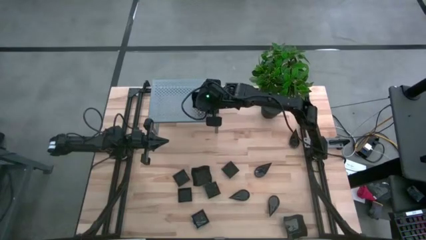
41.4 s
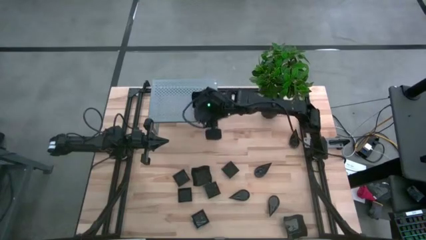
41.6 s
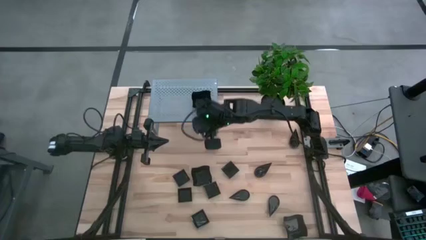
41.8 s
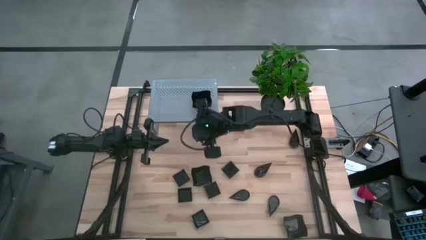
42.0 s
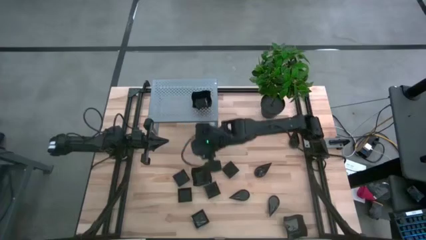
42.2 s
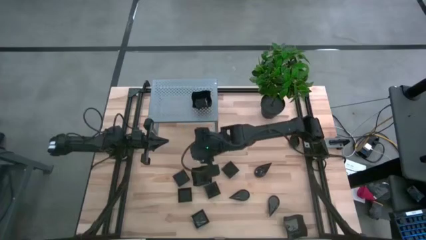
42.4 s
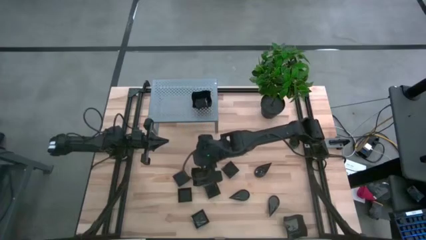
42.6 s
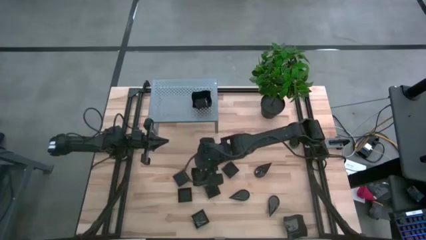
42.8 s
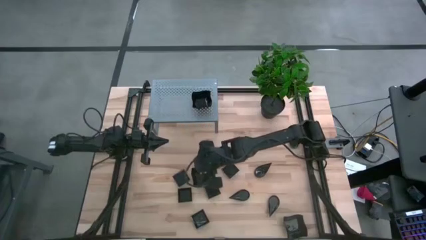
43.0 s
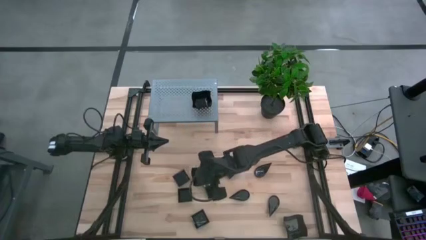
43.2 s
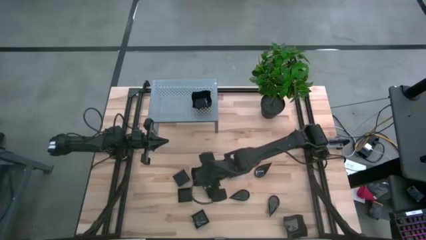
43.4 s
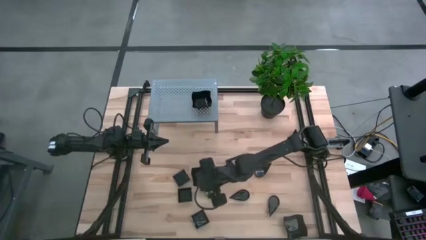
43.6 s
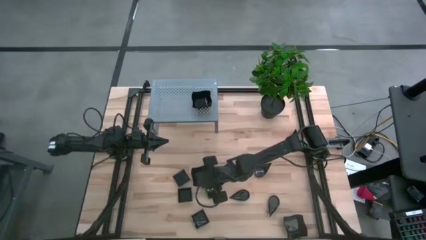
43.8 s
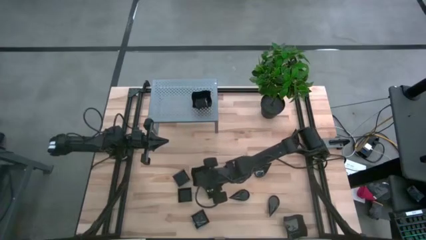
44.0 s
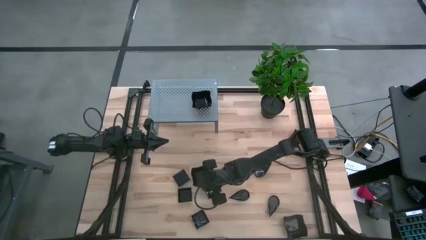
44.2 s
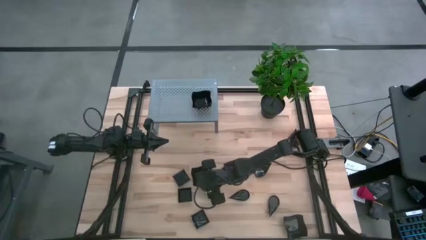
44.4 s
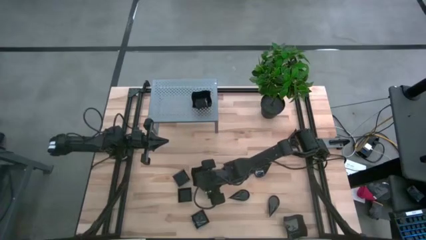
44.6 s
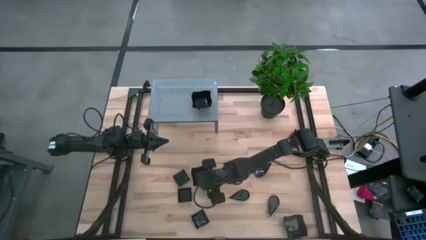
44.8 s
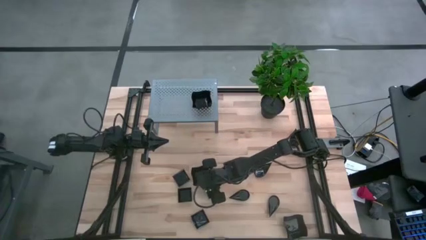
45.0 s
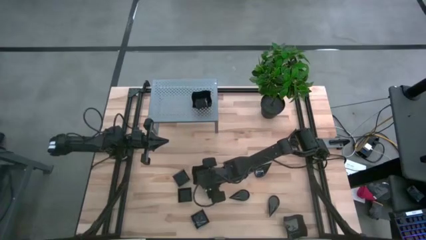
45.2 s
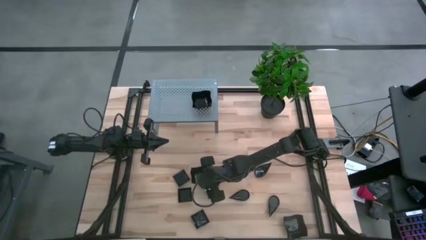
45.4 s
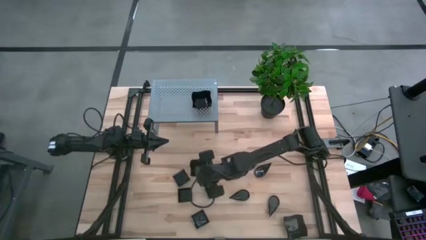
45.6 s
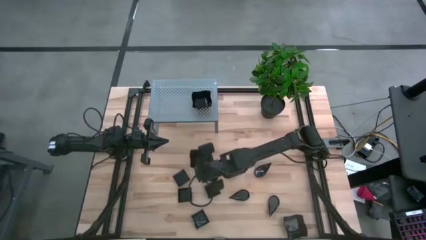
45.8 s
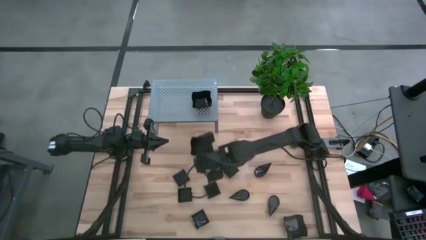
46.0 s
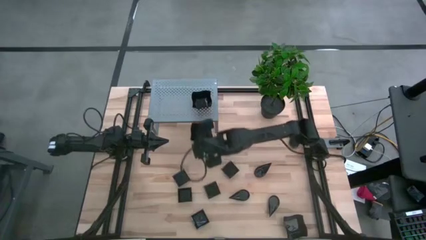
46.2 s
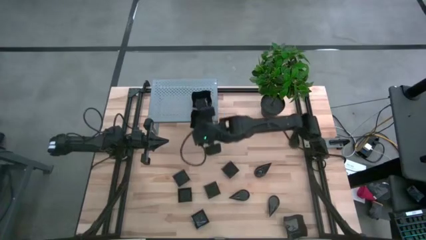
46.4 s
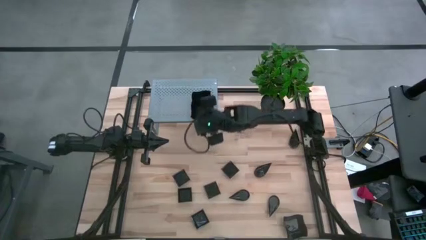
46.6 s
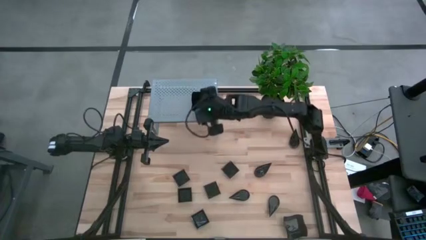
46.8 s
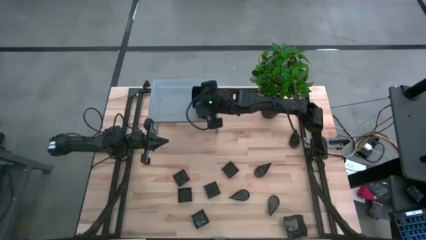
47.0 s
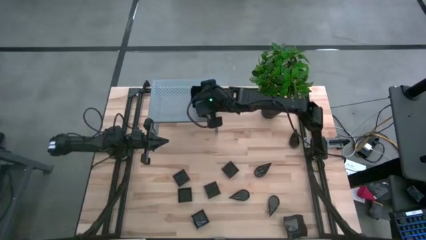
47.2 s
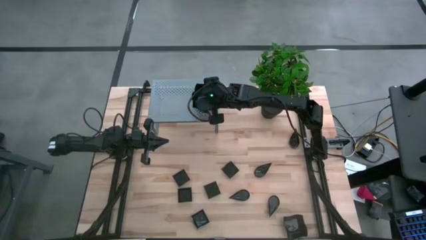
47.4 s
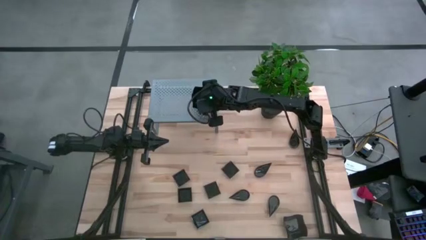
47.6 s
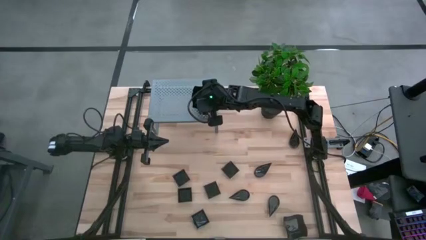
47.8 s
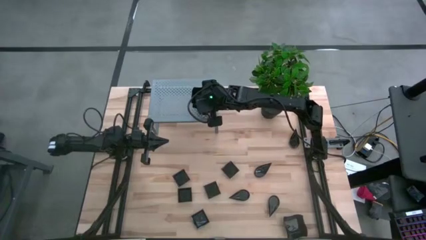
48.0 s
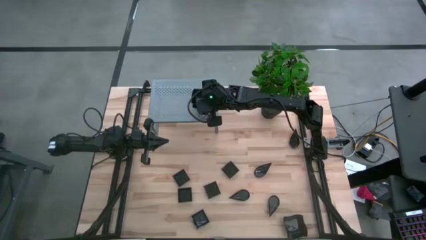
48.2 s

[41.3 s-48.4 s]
Task: Pick & Place Mini shaped plates
Stack the distorted square plate on top of the stacked distorted square plates on the shelf

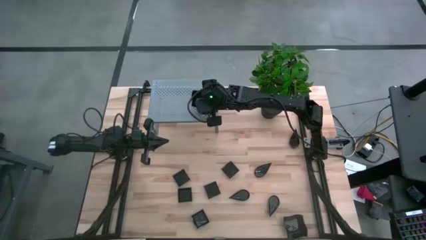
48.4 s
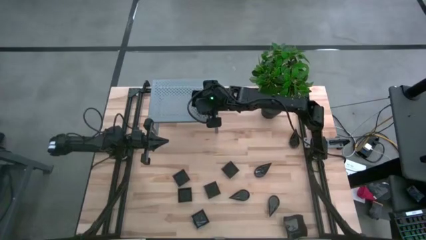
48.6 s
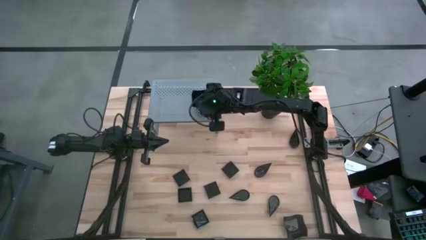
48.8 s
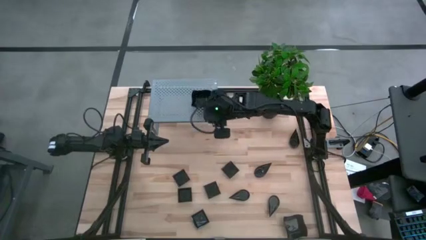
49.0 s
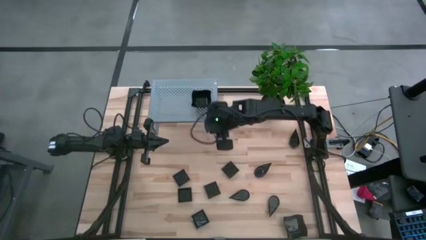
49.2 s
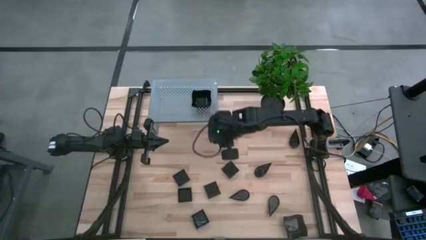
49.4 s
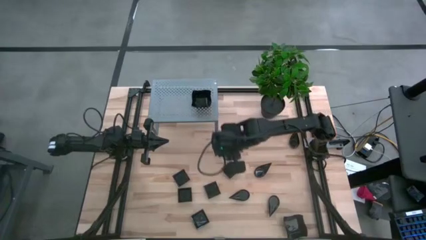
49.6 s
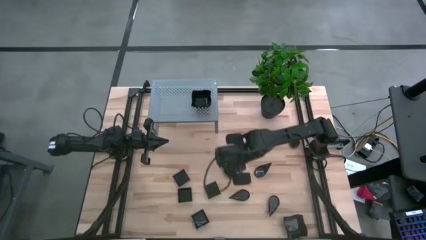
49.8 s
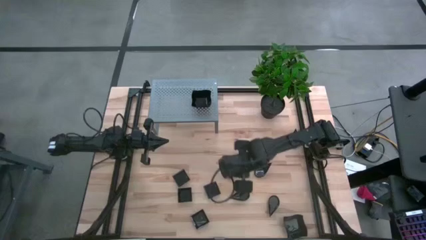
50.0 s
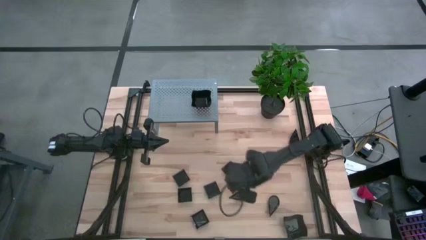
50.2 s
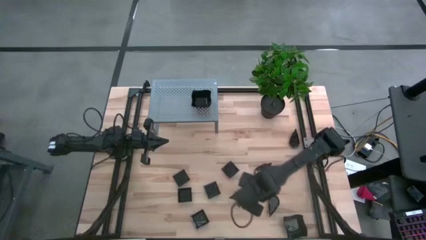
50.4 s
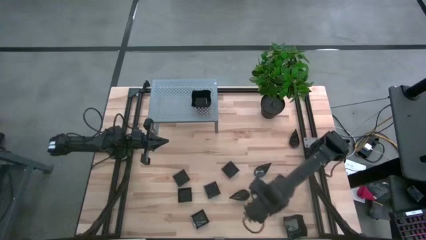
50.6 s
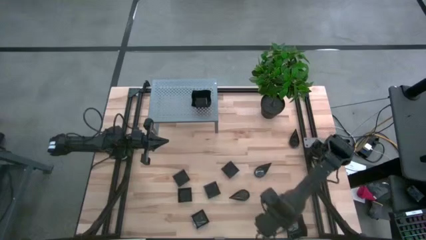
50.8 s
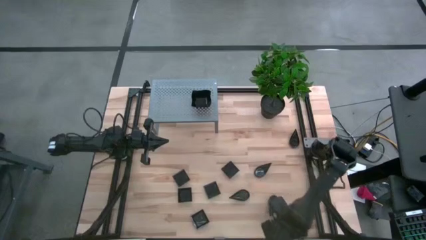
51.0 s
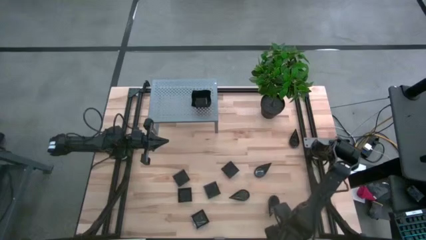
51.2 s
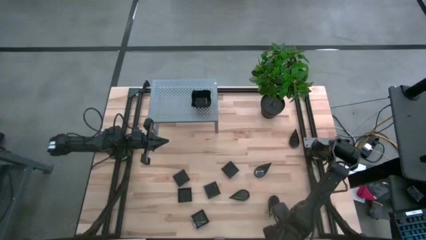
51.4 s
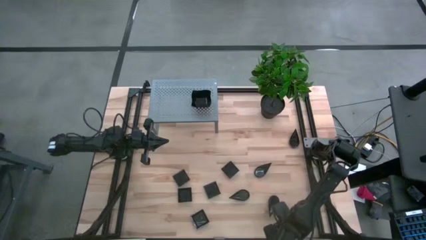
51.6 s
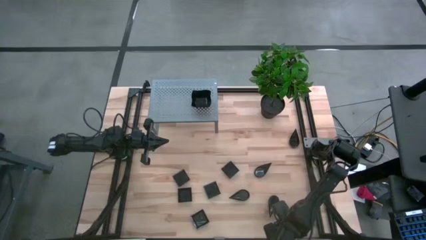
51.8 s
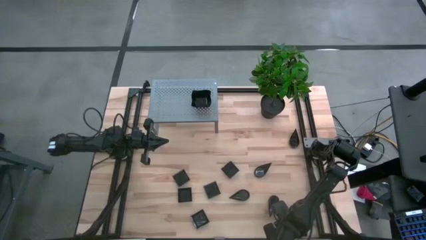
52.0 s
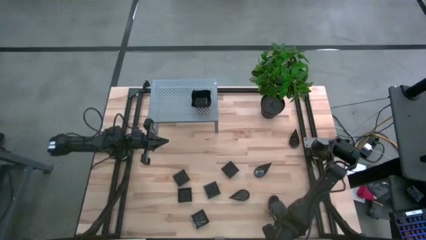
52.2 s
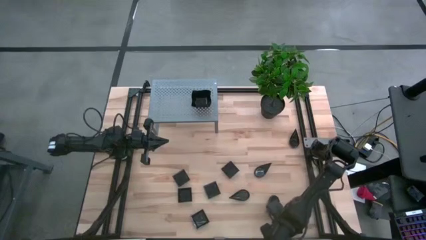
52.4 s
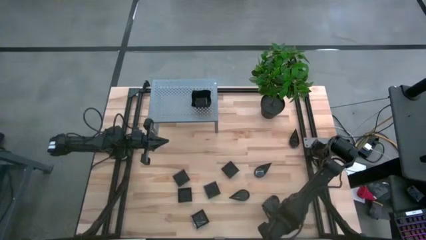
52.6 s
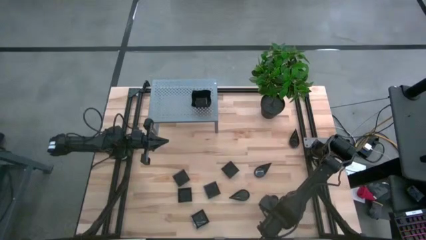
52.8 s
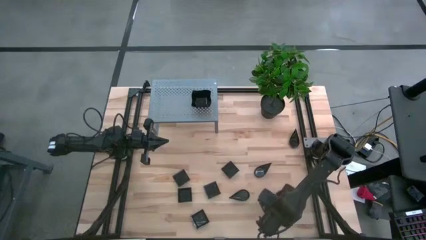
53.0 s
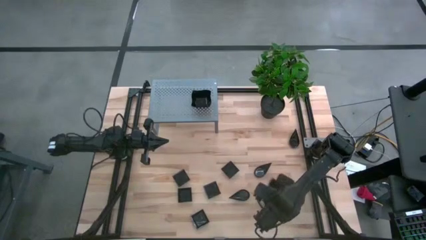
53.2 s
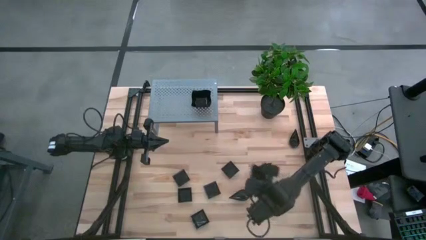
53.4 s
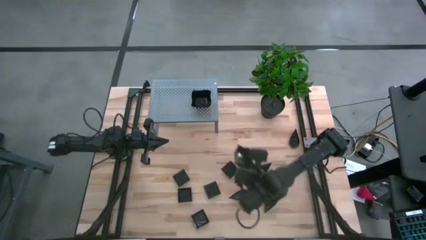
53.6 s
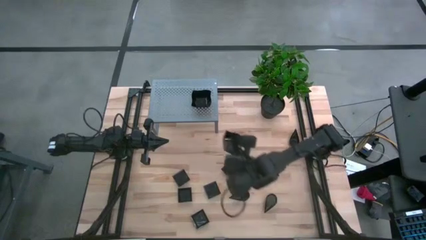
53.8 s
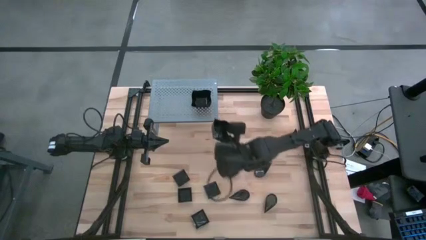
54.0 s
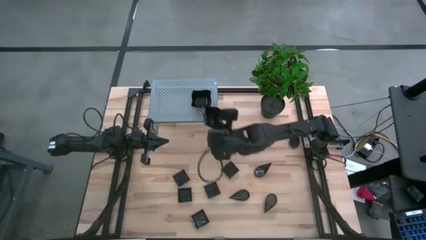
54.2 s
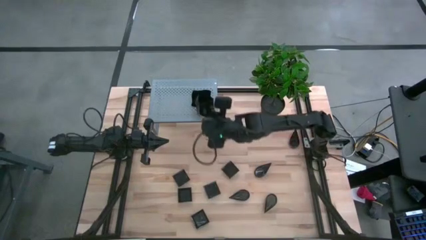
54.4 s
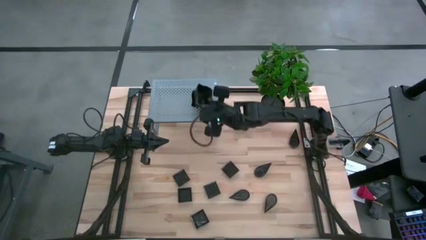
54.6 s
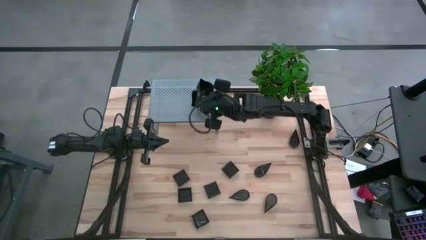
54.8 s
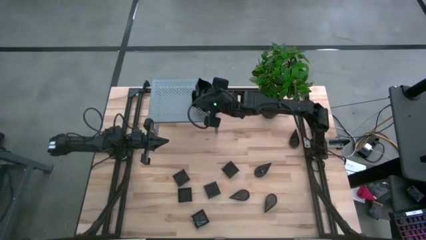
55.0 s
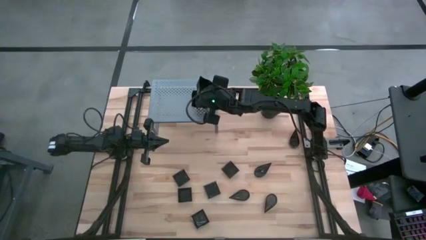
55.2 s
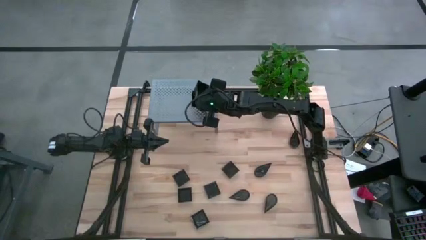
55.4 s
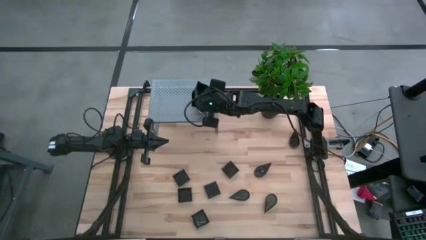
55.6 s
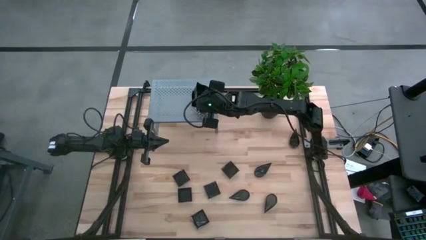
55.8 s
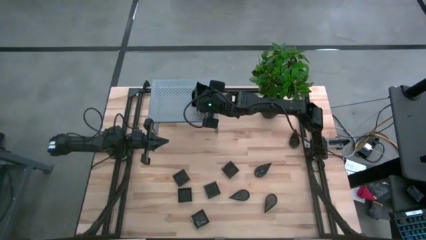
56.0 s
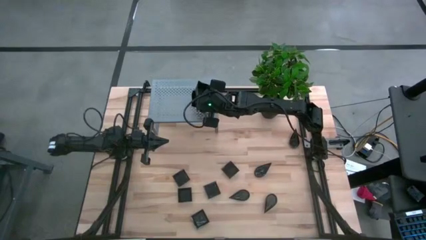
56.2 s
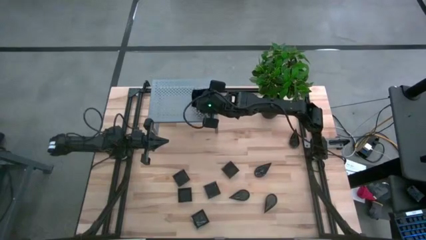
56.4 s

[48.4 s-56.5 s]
Stack the distorted square plate on top of the stacked distorted square plates on the shelf
